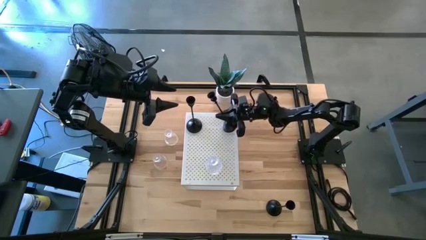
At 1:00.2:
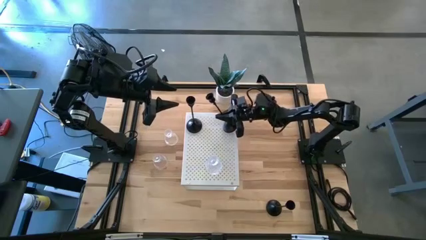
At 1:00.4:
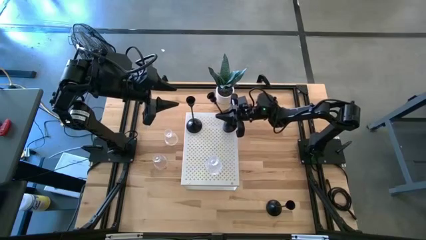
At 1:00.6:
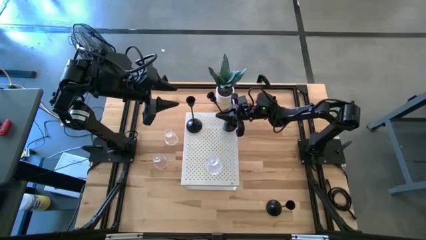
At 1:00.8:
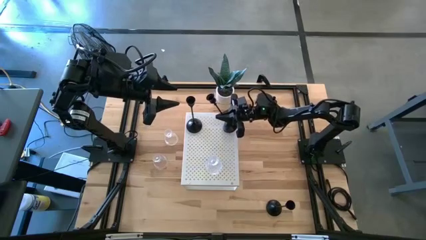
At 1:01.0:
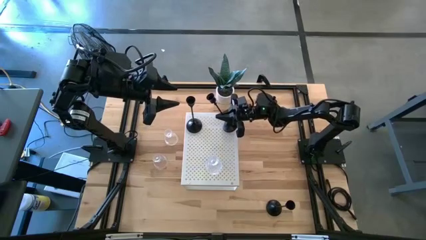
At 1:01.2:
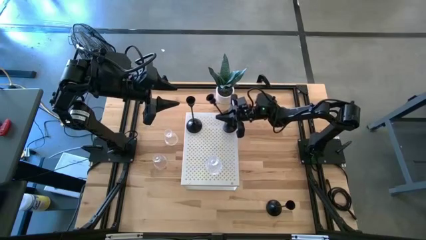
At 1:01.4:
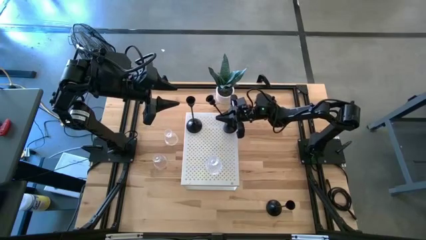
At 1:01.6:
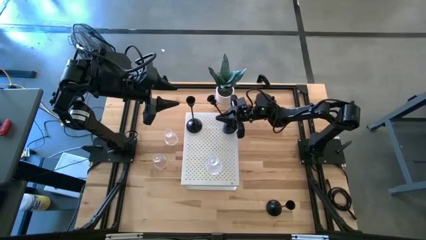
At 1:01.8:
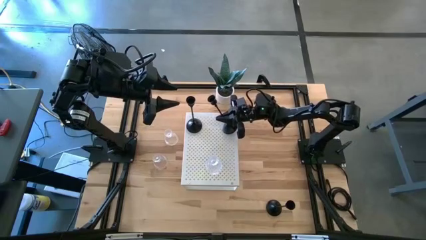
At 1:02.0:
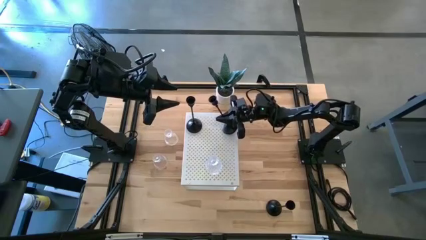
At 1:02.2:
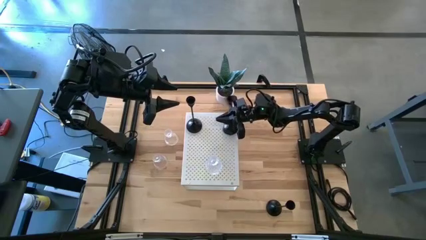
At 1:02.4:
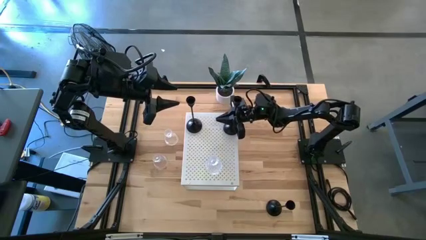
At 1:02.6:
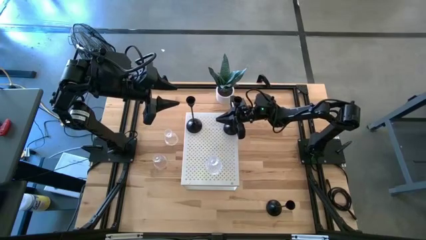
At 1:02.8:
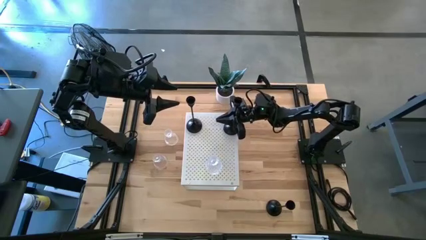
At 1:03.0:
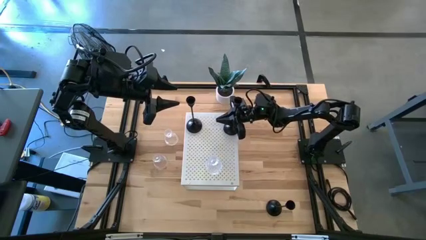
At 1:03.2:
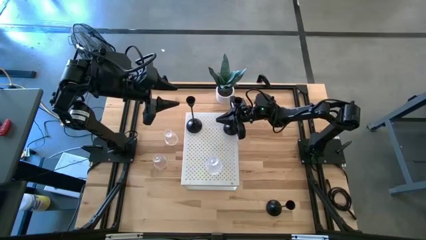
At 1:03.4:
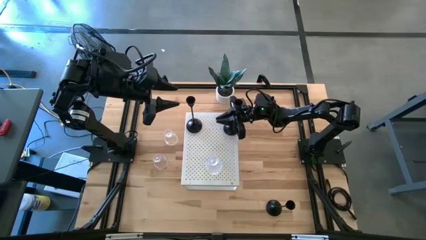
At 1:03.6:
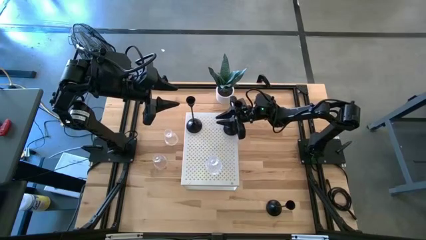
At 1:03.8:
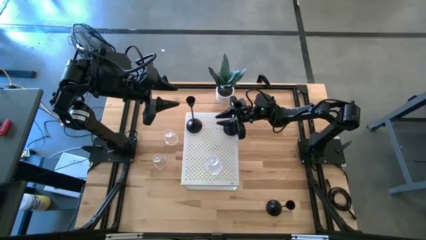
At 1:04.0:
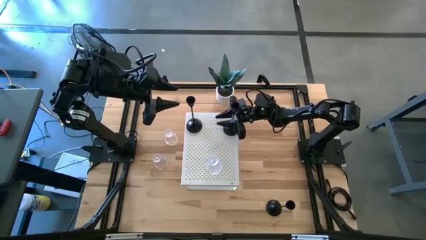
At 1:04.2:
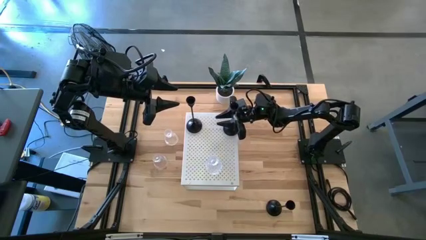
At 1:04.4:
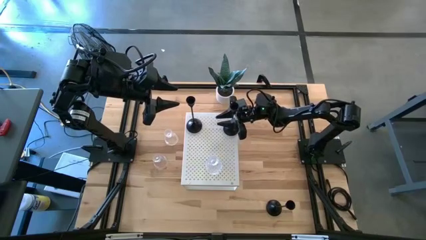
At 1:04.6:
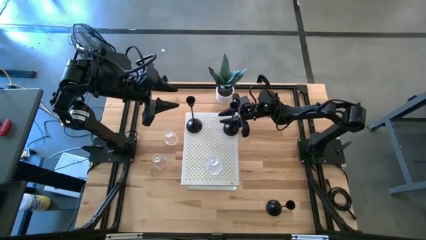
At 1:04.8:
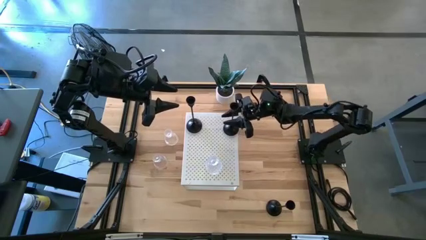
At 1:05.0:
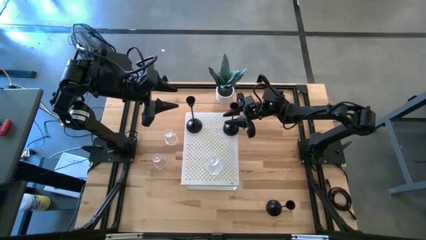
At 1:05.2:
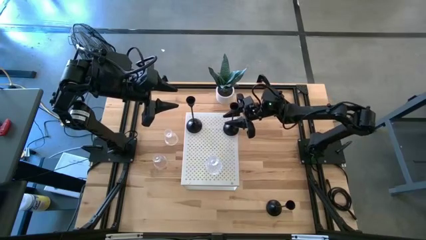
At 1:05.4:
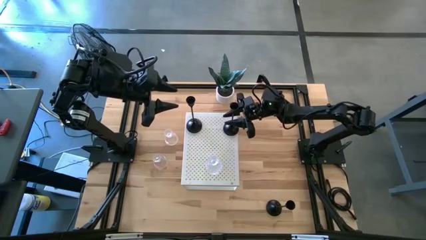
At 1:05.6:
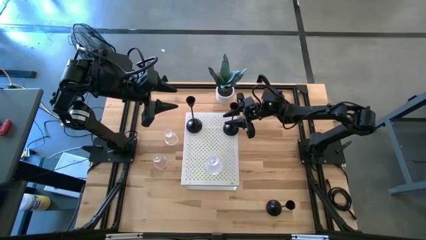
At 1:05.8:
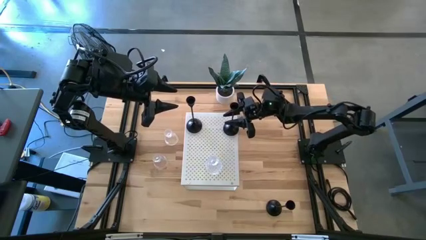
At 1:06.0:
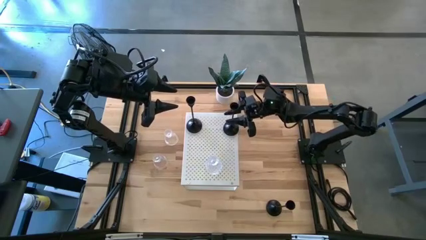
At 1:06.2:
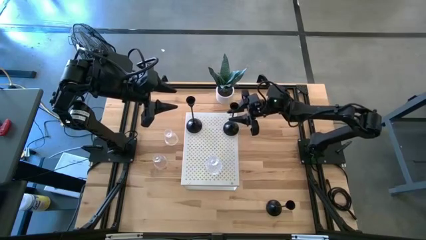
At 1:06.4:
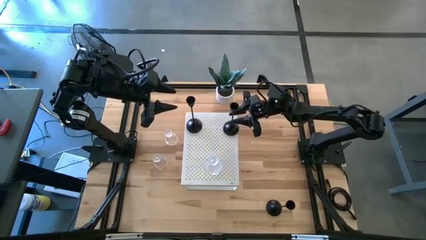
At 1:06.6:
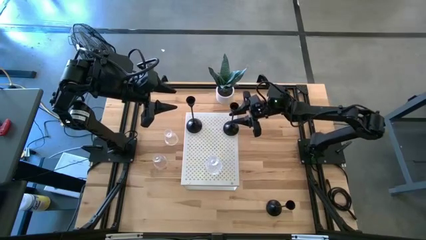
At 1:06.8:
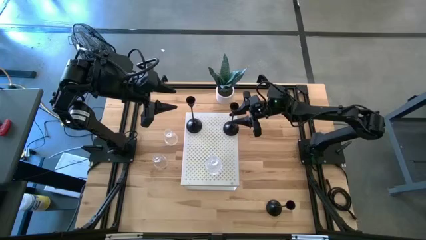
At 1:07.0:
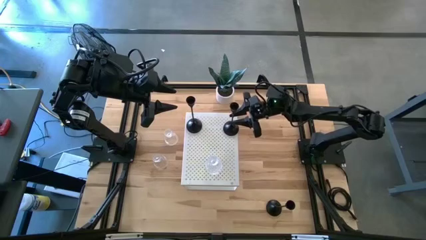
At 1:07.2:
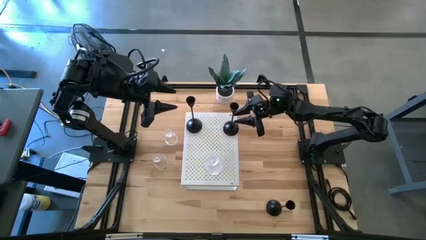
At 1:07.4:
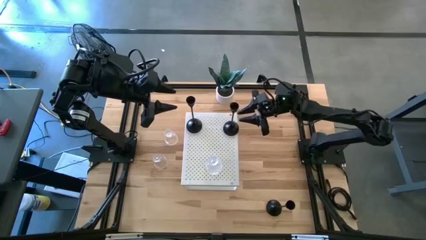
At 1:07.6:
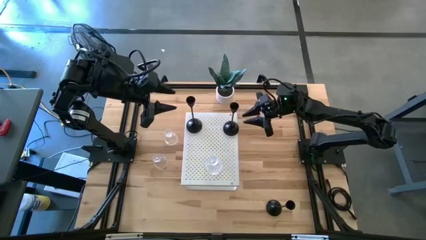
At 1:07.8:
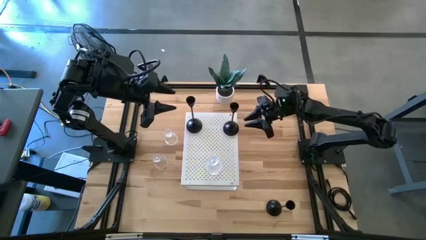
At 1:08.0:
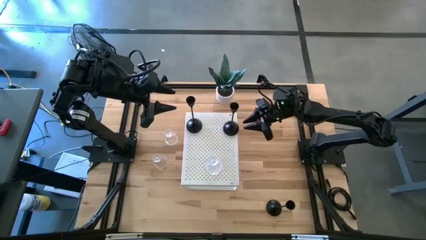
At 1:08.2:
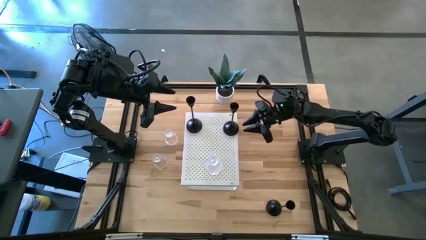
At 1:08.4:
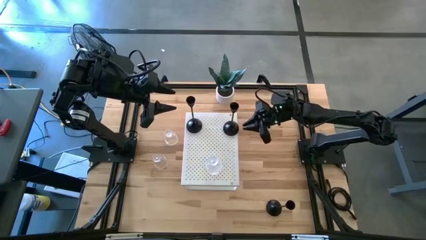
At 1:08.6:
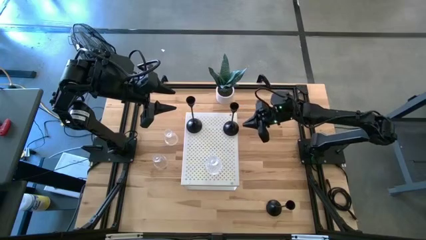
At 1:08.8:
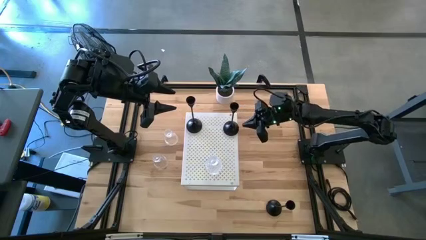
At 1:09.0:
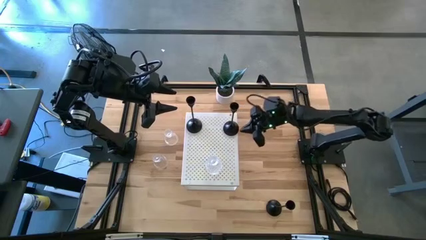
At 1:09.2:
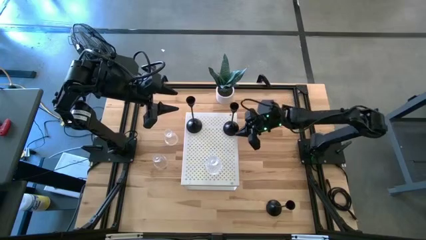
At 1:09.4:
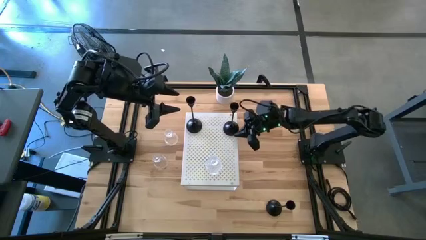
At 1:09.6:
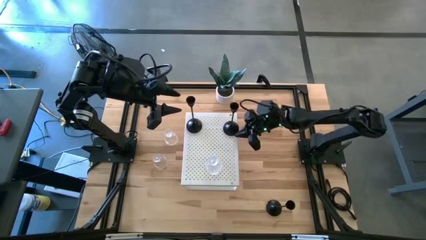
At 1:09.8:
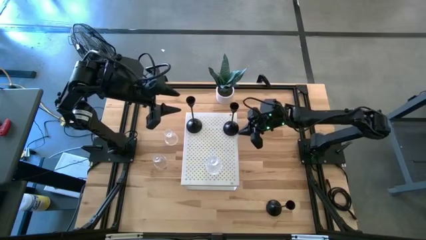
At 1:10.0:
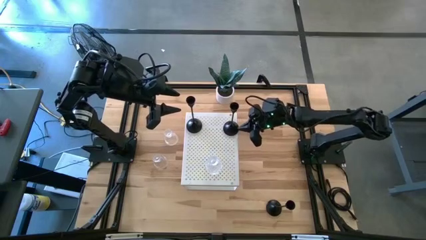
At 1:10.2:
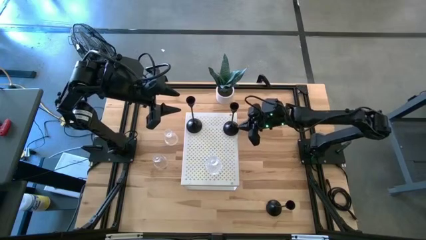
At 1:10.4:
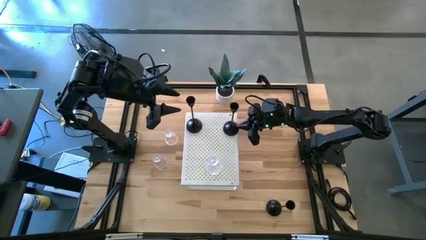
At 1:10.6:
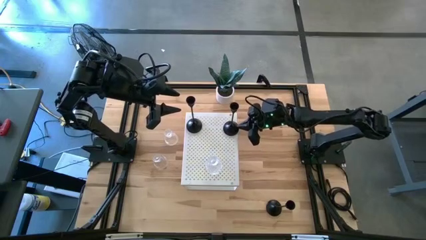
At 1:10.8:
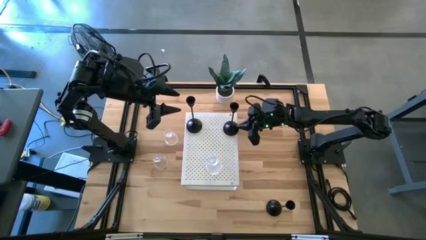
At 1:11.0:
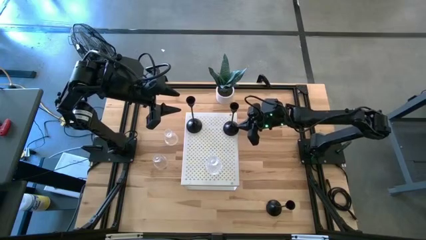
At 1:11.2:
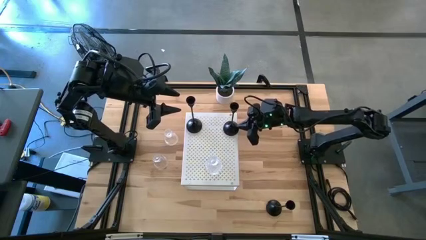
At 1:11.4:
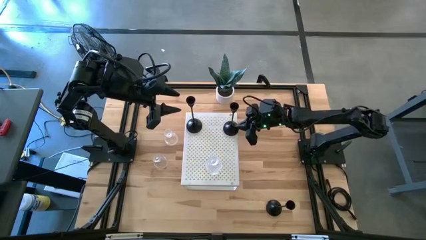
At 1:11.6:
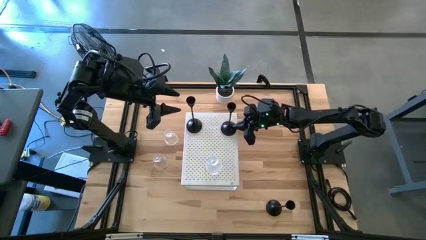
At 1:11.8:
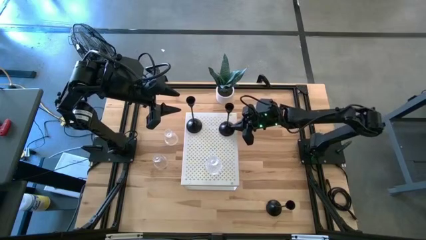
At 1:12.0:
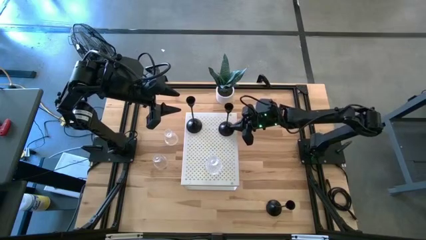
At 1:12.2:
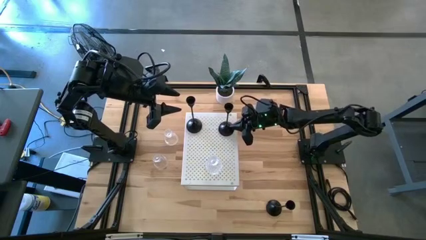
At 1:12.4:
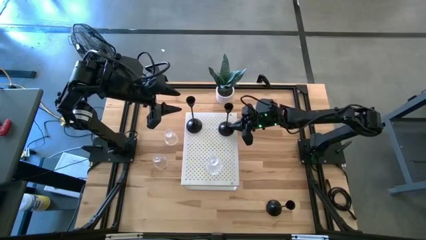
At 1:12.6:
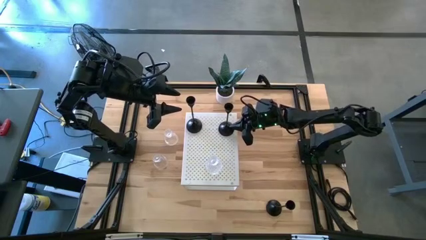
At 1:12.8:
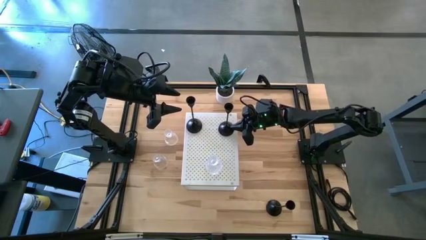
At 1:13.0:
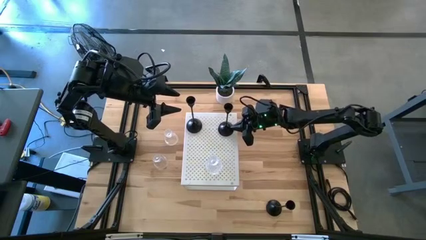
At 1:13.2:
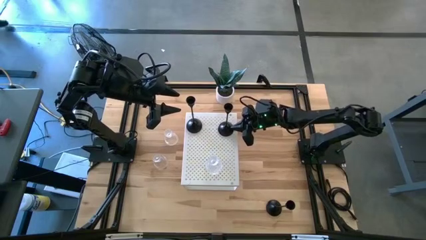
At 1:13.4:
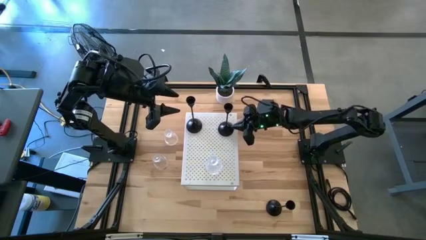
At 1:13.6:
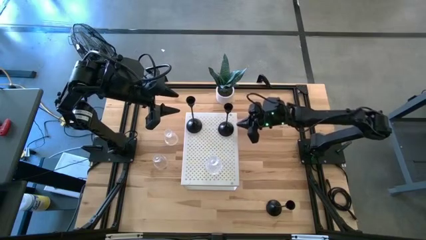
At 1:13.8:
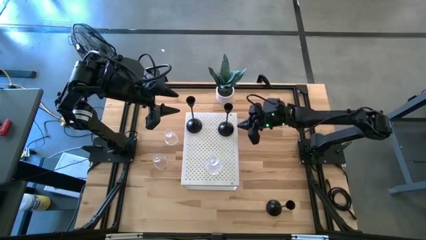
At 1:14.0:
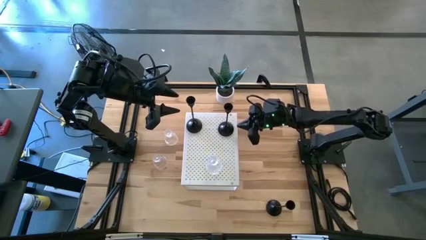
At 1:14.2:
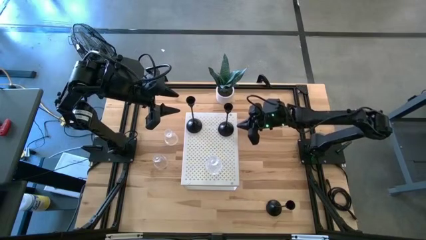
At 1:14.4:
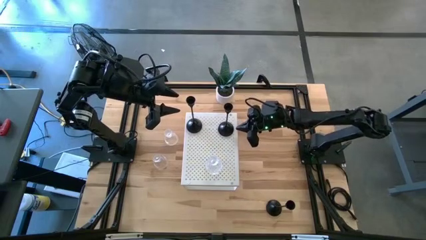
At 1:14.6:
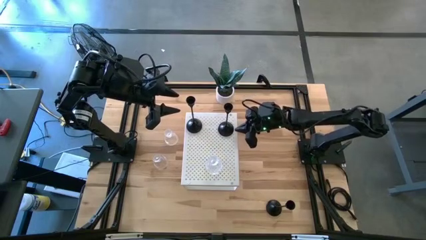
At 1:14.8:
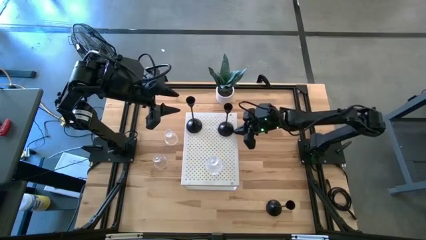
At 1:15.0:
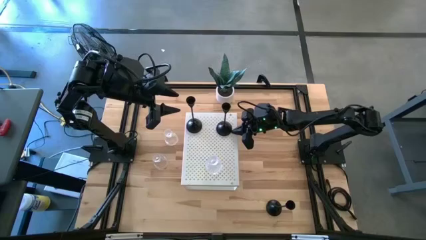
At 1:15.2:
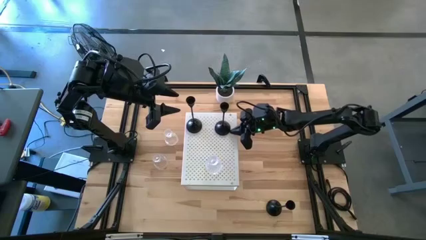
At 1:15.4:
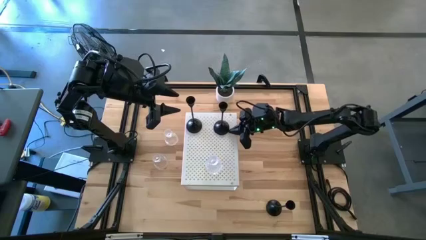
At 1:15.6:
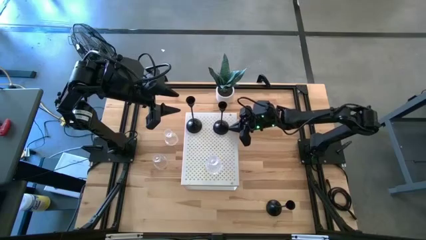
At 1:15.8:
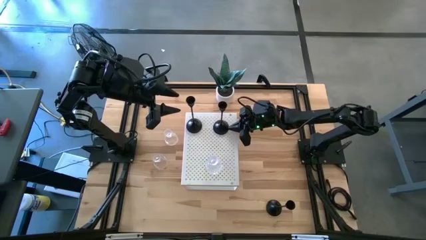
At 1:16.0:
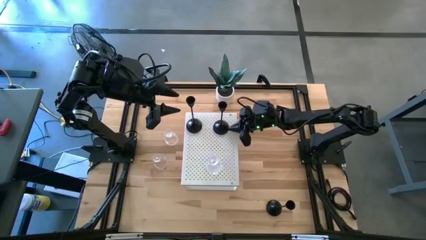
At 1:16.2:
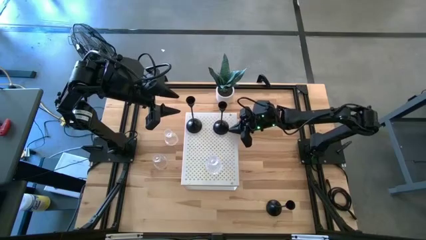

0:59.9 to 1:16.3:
Task: Pick & Place candle stick holders
Put the bottom left black candle holder on the shelf
